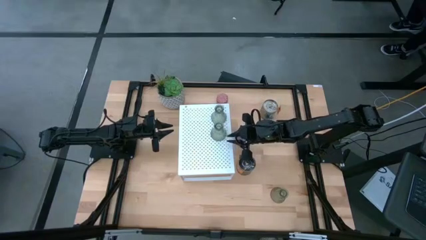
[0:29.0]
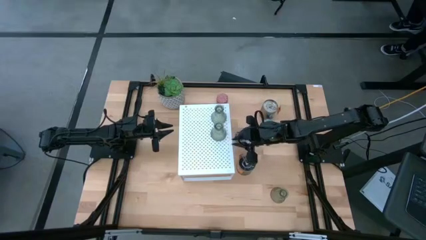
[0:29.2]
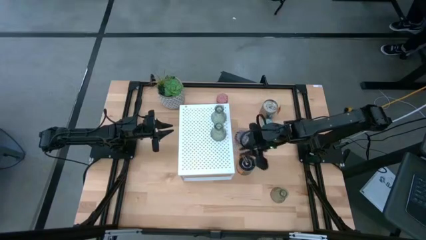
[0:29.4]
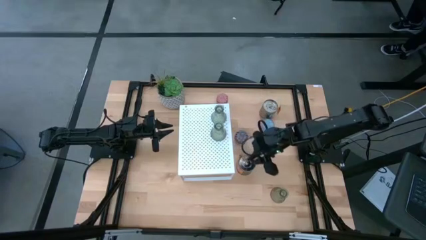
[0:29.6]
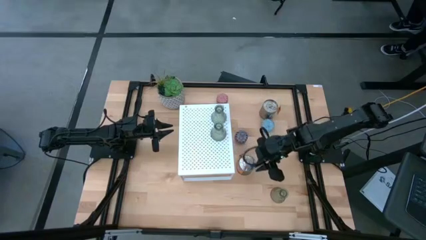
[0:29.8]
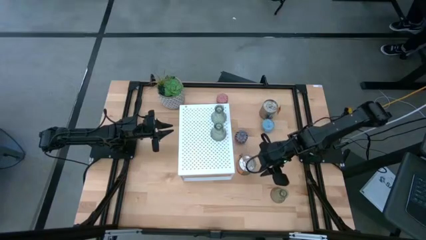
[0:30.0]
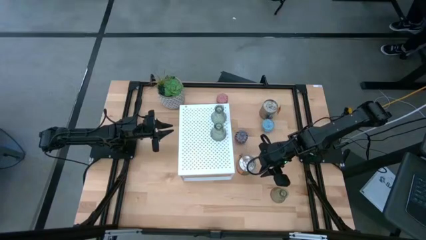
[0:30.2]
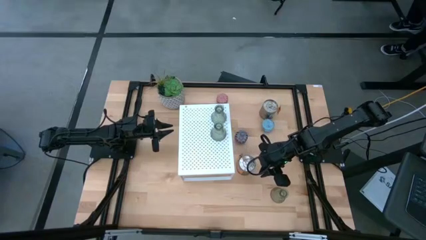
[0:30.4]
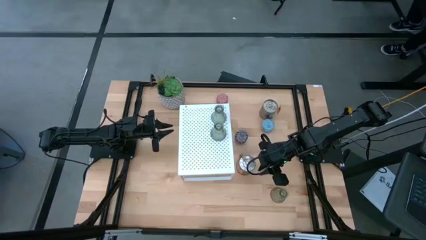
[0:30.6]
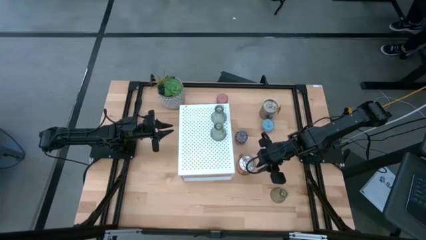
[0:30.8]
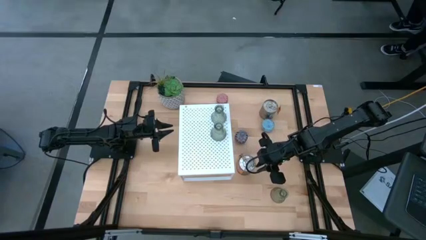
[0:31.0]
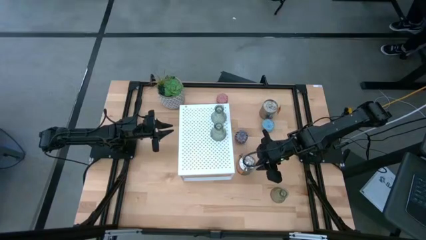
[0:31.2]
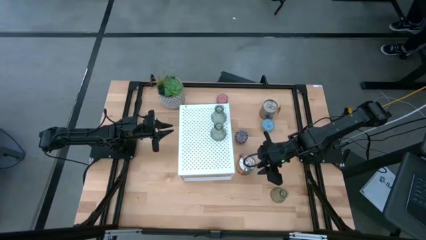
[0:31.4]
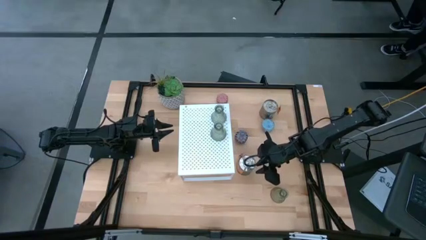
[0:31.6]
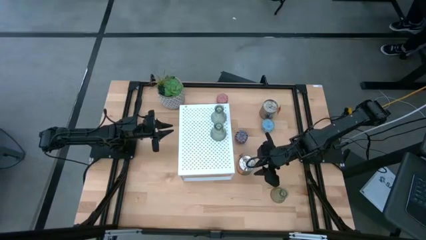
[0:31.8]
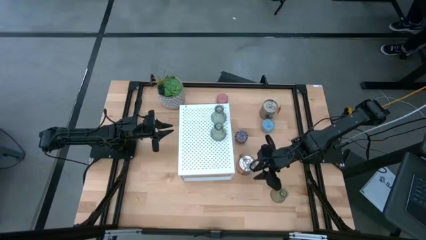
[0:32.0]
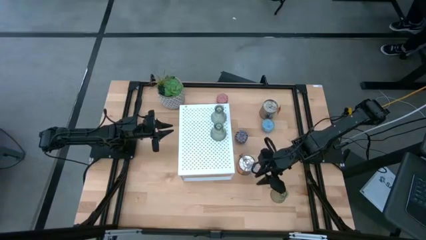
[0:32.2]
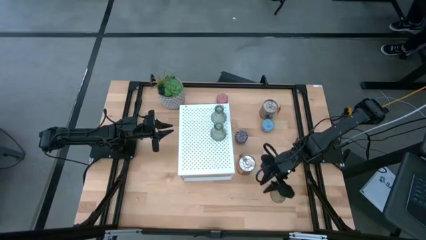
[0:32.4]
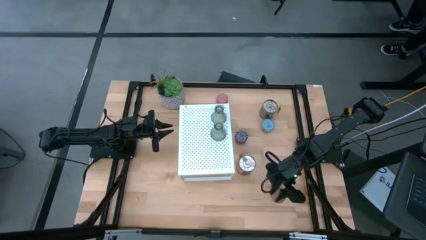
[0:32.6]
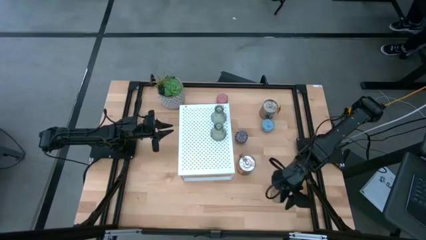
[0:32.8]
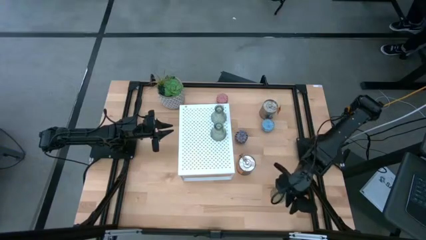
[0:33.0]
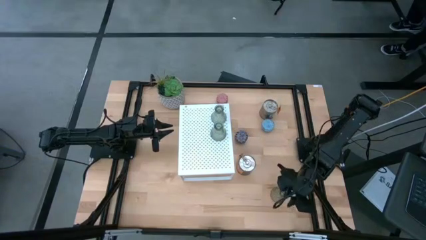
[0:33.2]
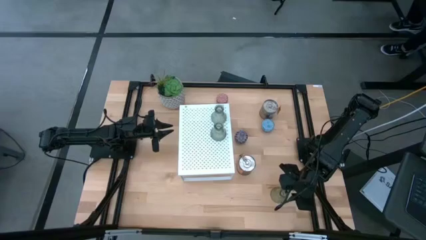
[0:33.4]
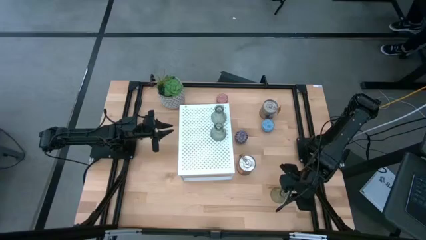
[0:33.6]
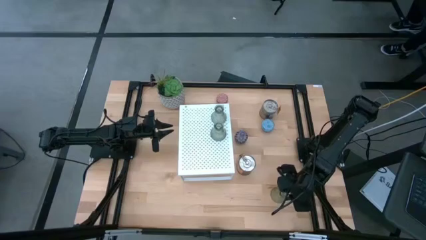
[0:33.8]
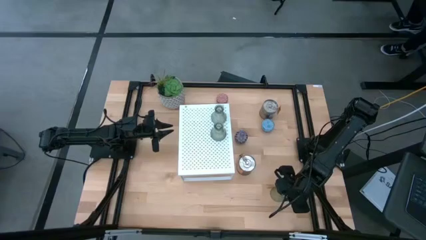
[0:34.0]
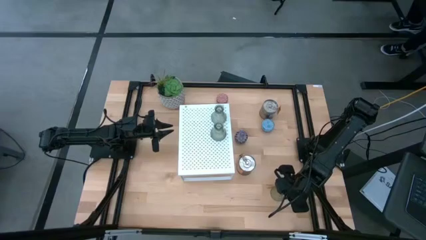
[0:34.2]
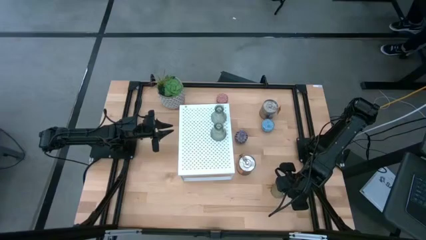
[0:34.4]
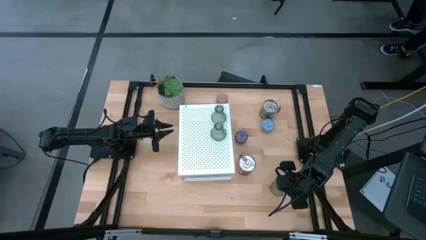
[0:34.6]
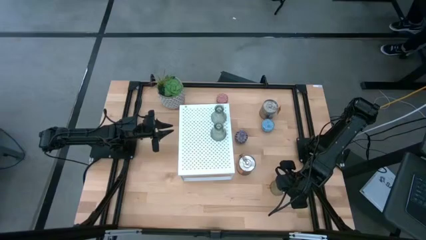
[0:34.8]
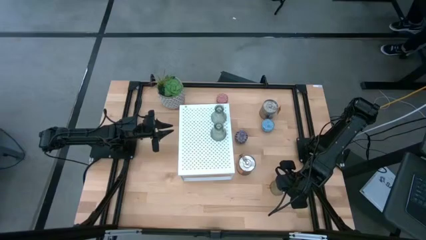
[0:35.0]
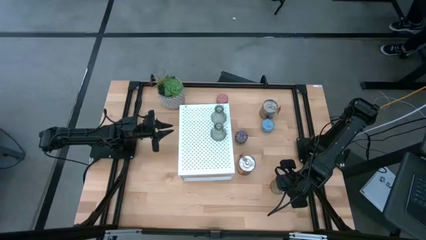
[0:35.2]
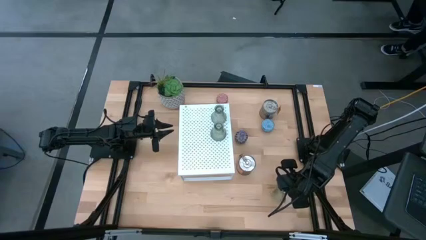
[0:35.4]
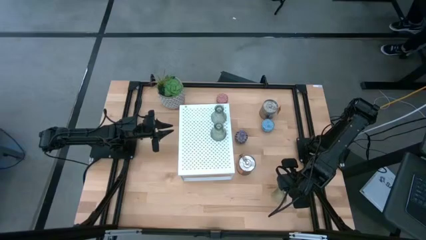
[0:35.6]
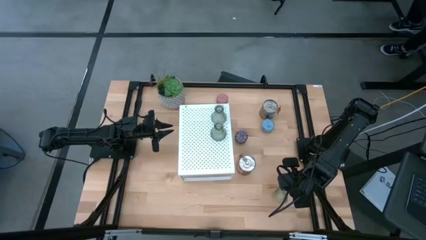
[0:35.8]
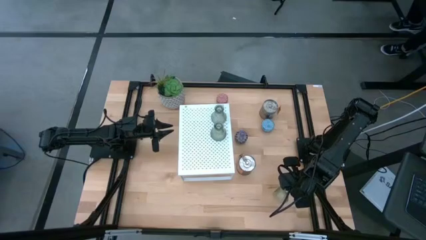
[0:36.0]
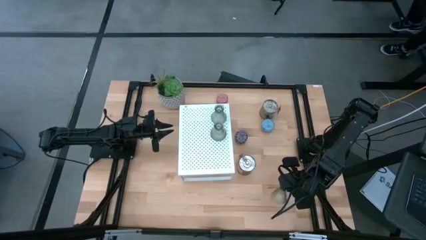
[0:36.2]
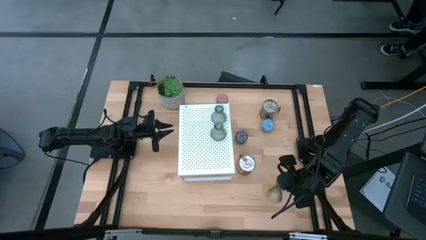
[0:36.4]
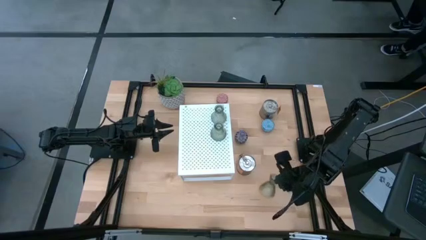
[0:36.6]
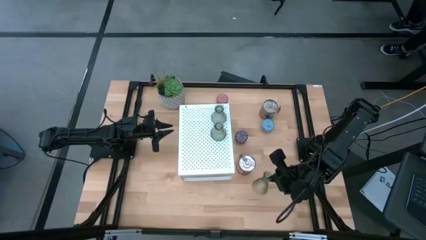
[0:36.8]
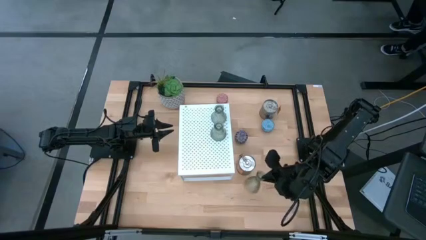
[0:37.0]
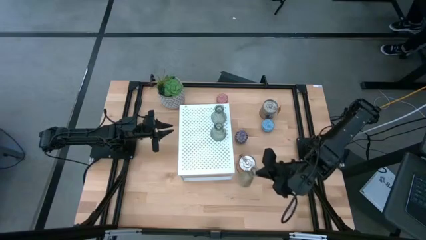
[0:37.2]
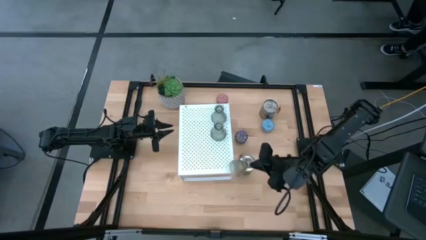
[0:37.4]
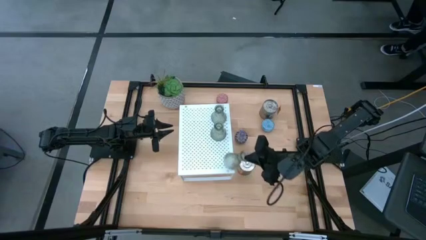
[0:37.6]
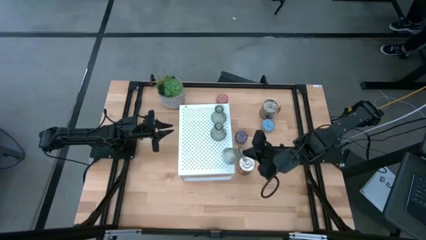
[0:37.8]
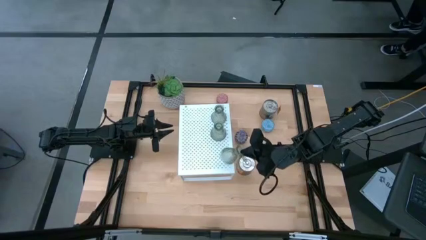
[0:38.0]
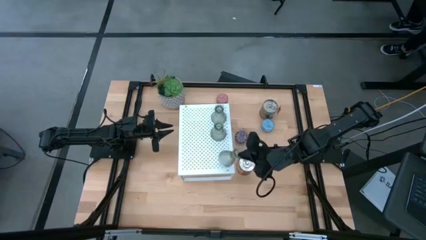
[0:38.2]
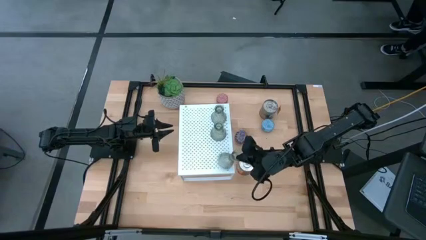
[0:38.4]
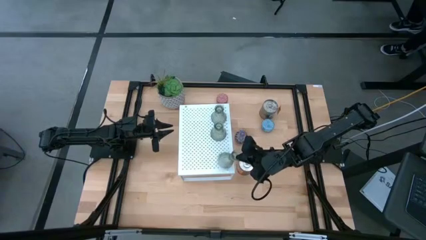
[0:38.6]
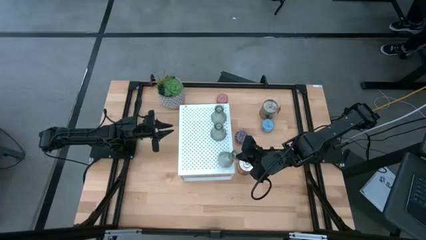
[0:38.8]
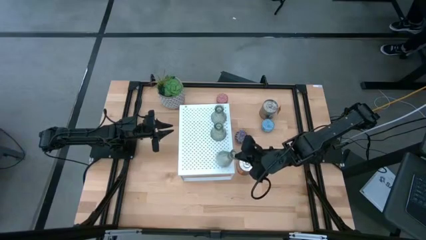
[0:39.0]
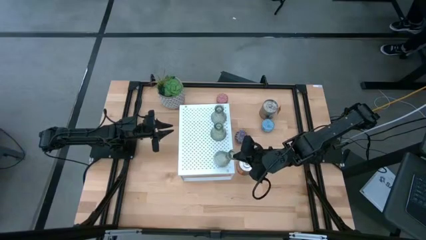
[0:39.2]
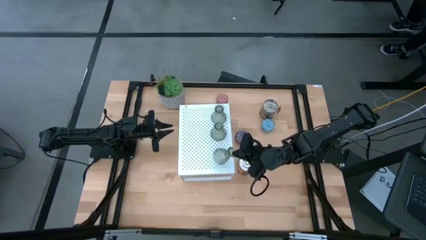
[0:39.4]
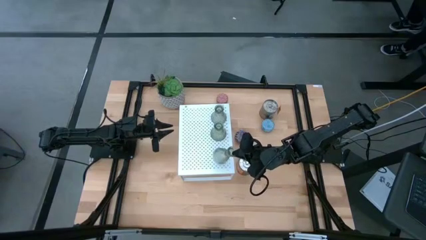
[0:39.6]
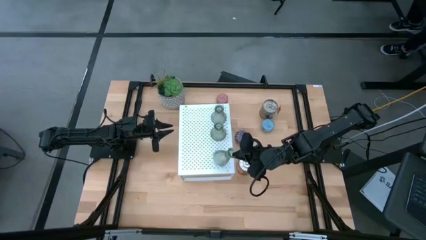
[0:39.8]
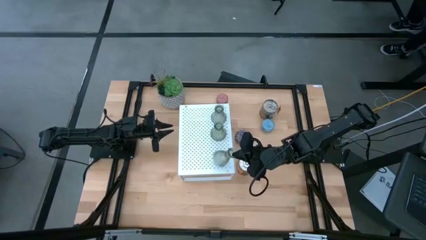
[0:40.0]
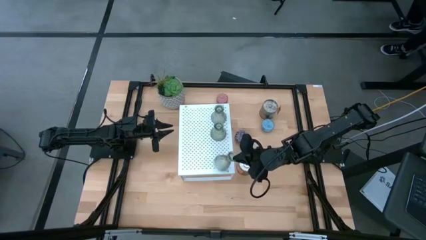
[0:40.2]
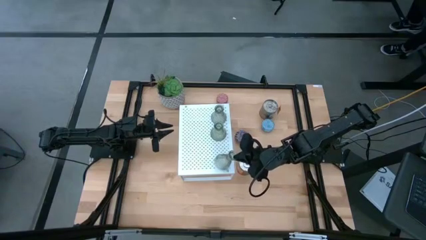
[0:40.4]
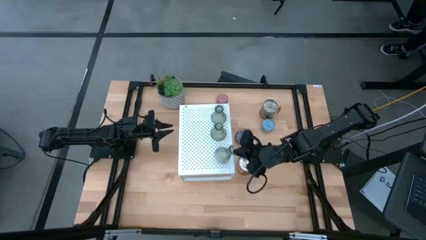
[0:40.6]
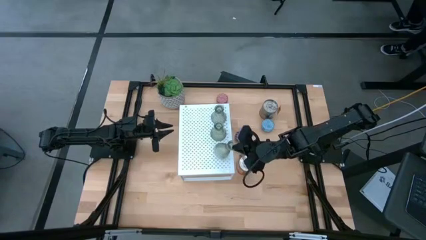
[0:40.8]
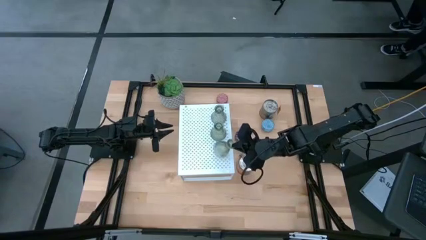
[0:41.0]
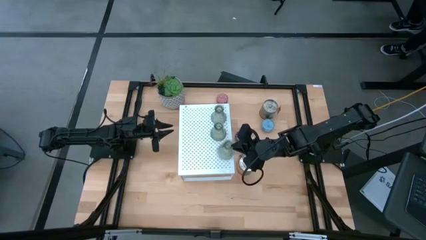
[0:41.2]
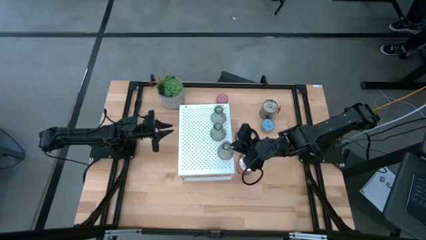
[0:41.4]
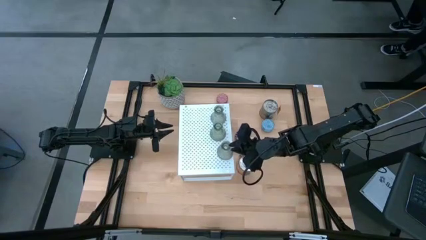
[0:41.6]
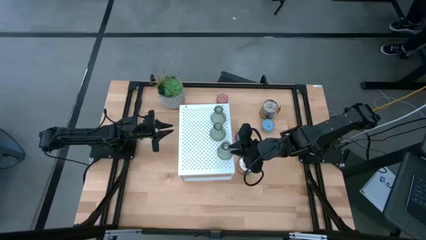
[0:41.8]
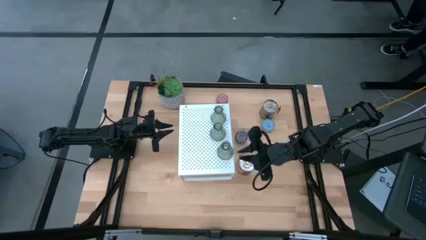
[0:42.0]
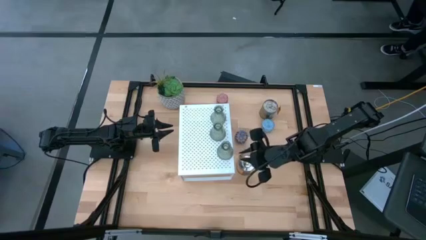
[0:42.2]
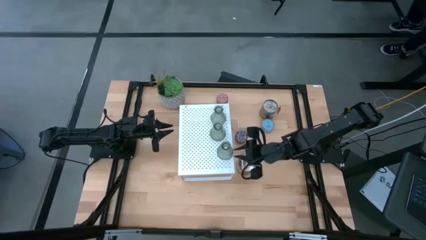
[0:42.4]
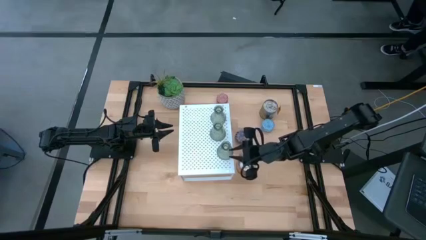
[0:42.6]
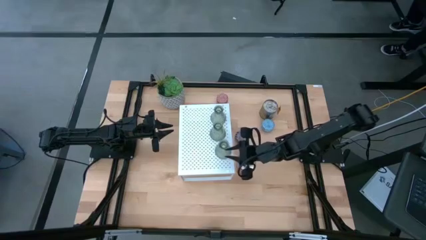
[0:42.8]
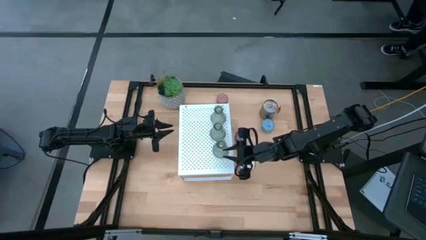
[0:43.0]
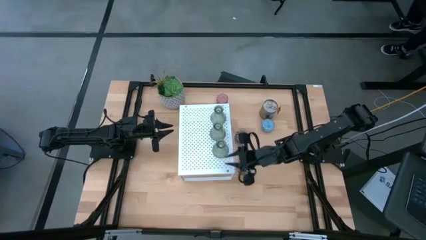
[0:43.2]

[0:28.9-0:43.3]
Task: Pick & Place candle stick holders
Align the green glass candle holder with the other green glass candle holder on the shelf

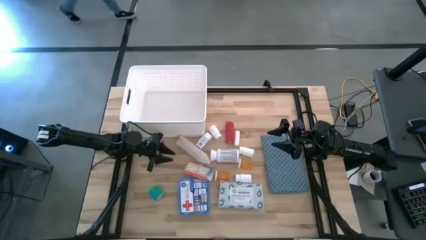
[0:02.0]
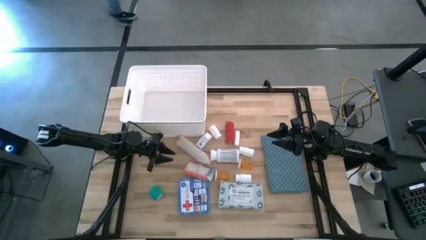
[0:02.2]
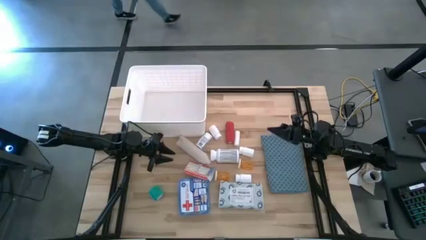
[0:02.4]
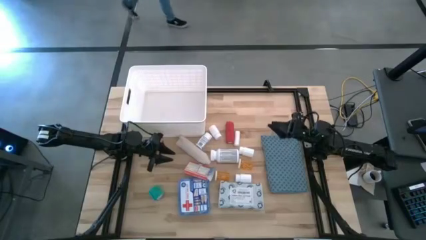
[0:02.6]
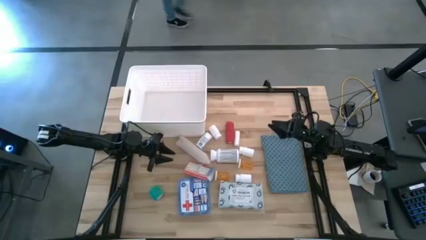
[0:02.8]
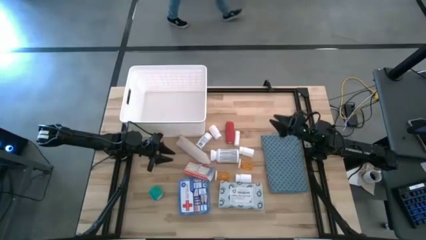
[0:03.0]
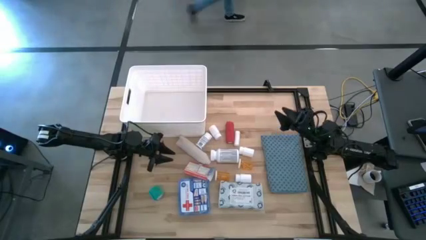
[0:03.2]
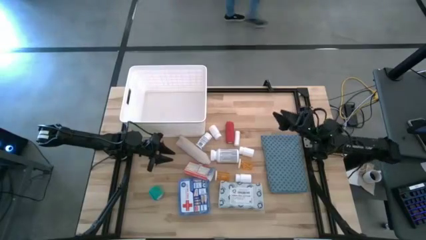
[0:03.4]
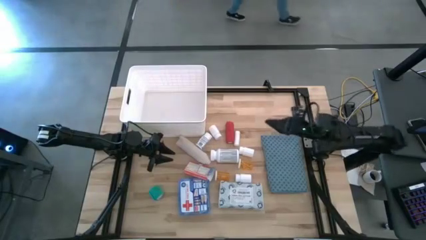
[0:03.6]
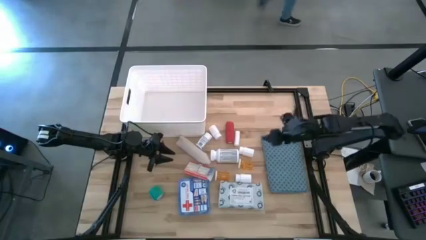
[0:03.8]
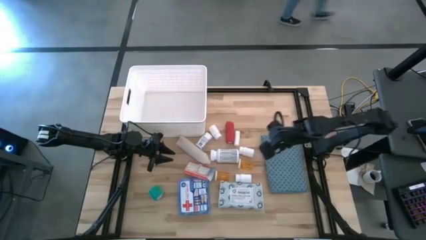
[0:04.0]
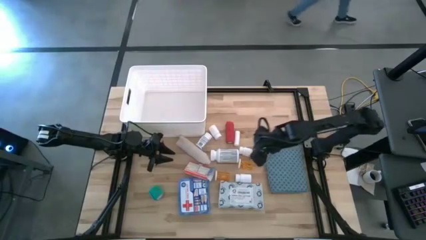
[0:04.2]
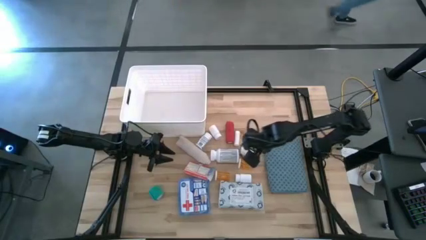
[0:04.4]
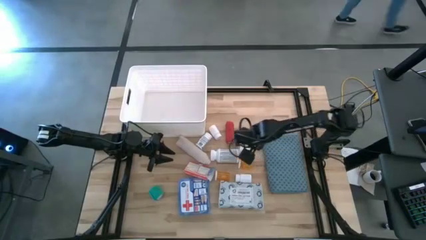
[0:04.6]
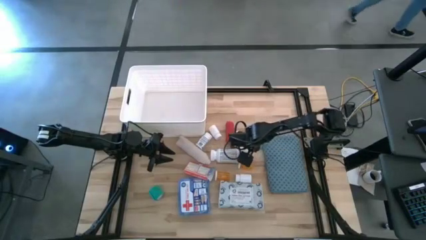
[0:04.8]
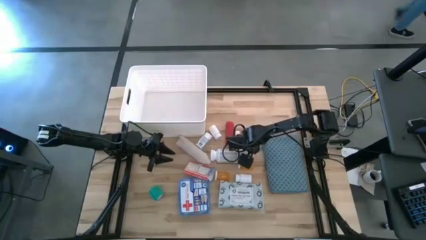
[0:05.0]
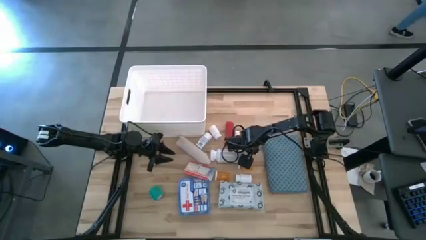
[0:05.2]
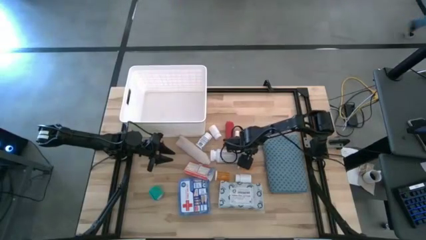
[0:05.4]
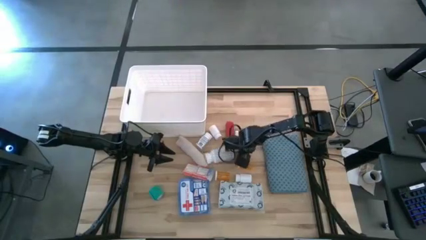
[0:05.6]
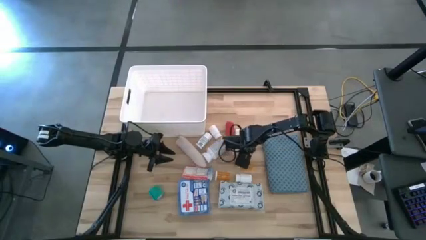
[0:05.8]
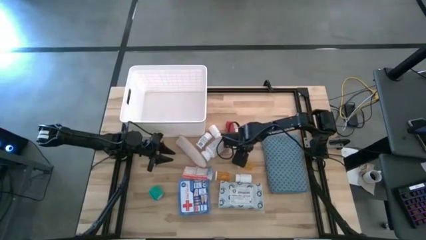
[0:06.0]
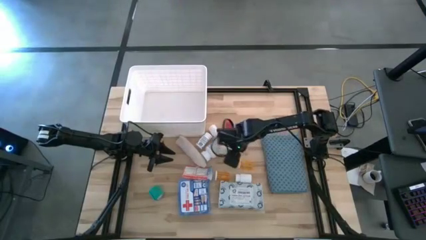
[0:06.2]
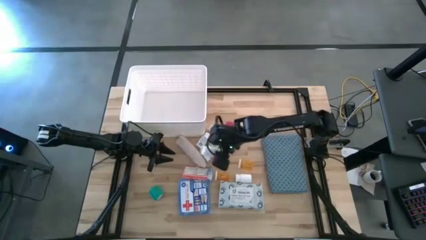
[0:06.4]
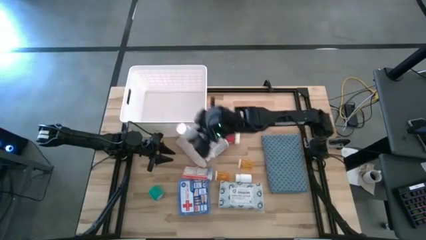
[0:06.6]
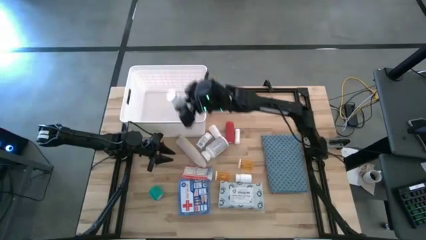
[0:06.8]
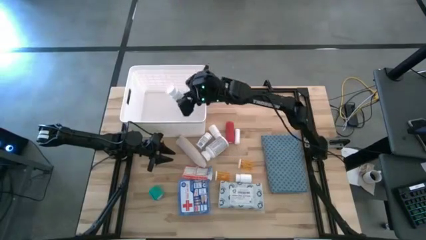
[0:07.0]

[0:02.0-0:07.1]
Task: Pick & place medical supplies in basket/bin
Put the middle right white pill bottle into the white bin
